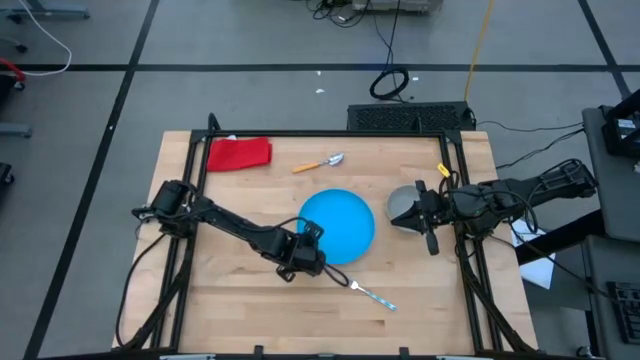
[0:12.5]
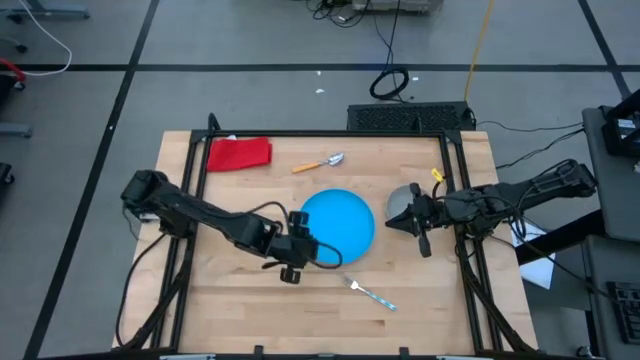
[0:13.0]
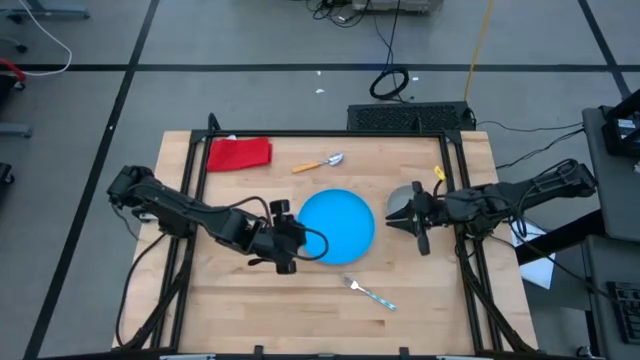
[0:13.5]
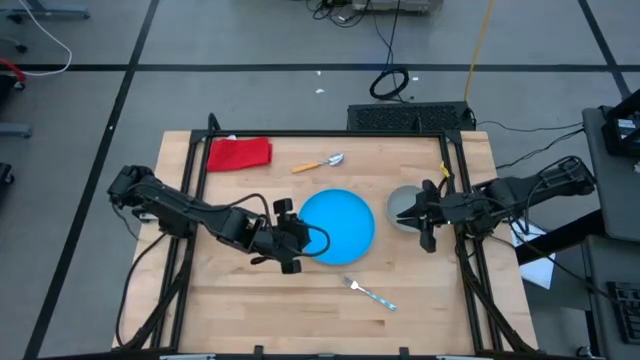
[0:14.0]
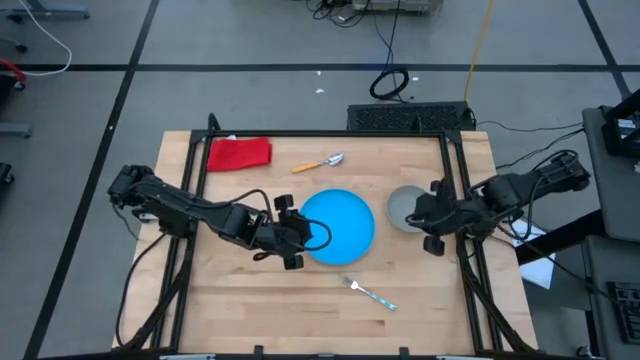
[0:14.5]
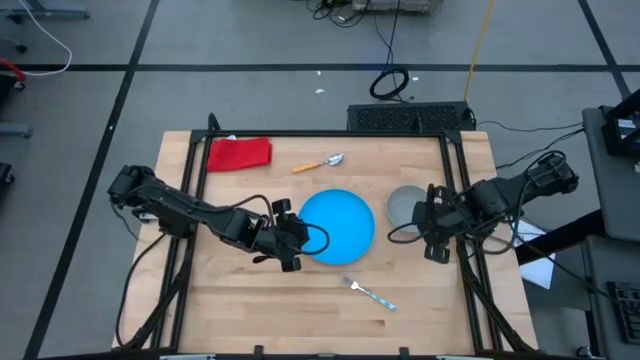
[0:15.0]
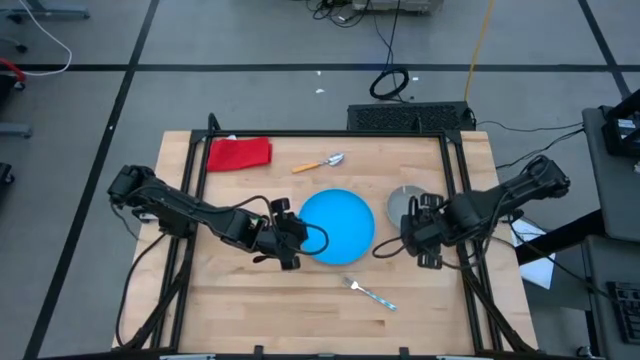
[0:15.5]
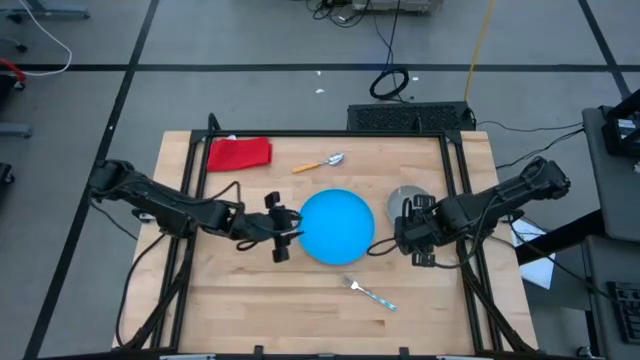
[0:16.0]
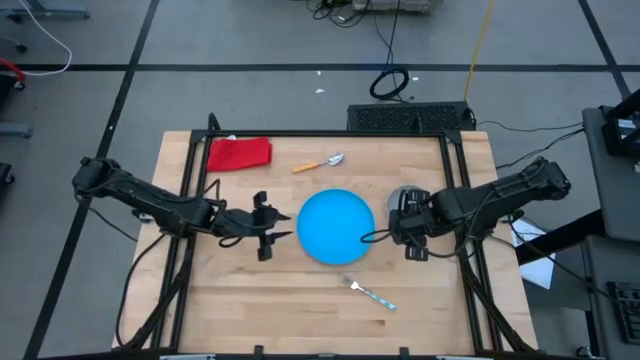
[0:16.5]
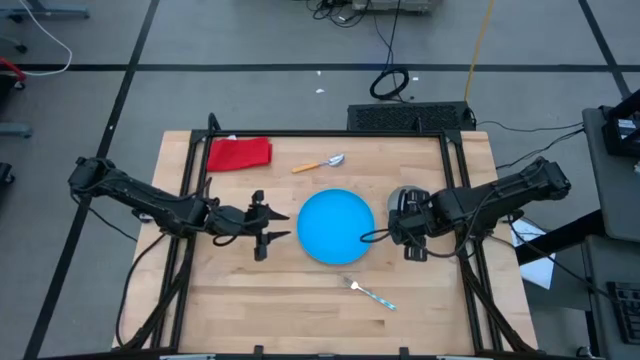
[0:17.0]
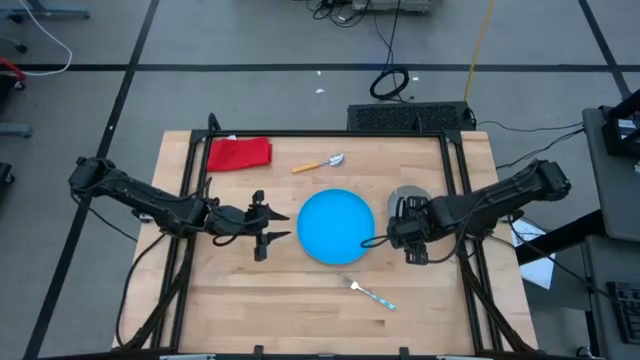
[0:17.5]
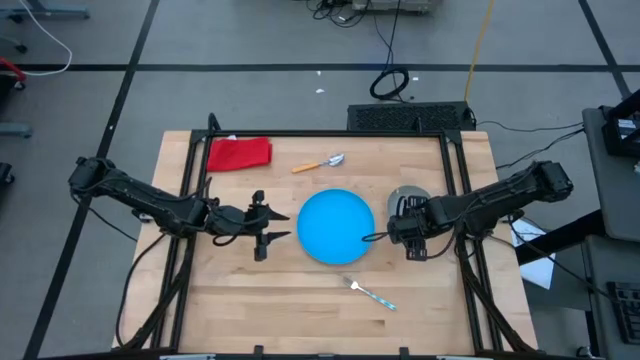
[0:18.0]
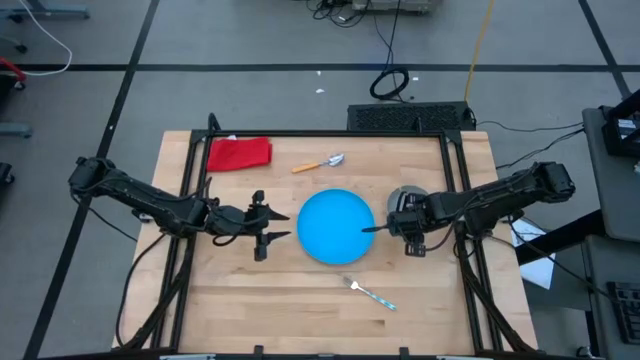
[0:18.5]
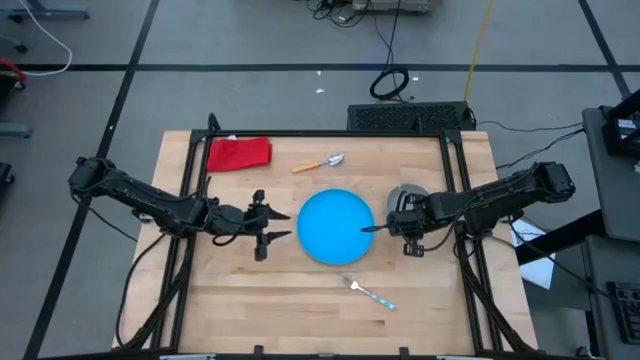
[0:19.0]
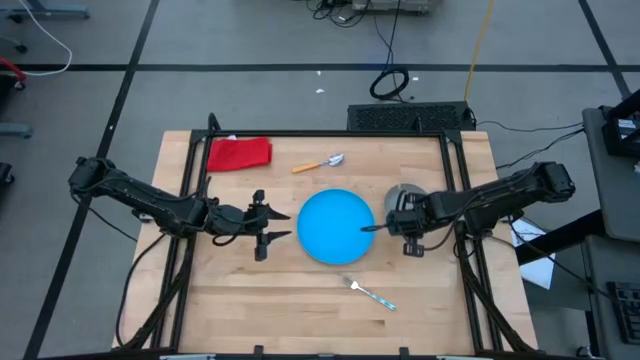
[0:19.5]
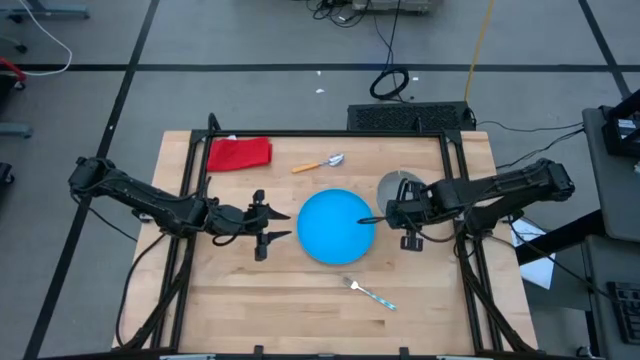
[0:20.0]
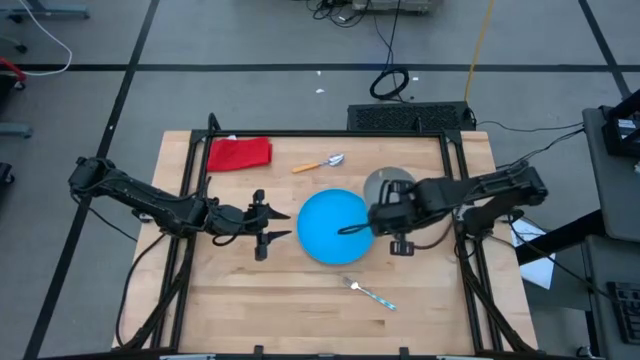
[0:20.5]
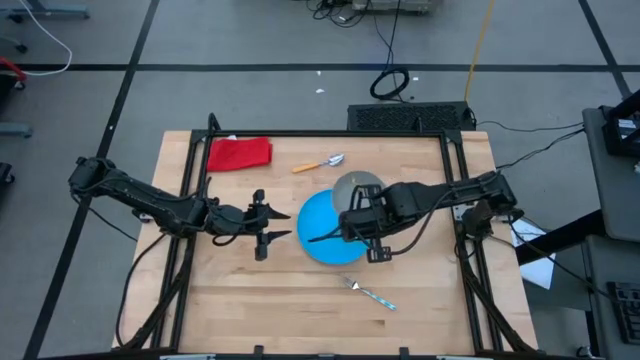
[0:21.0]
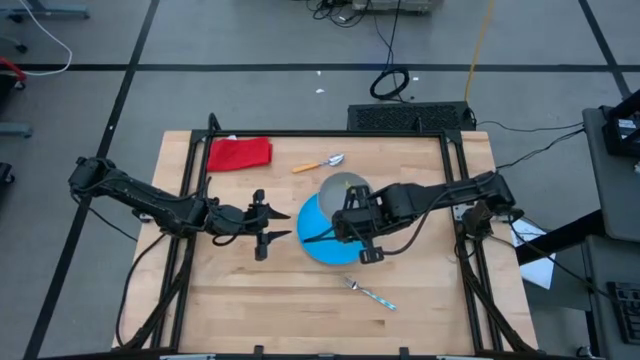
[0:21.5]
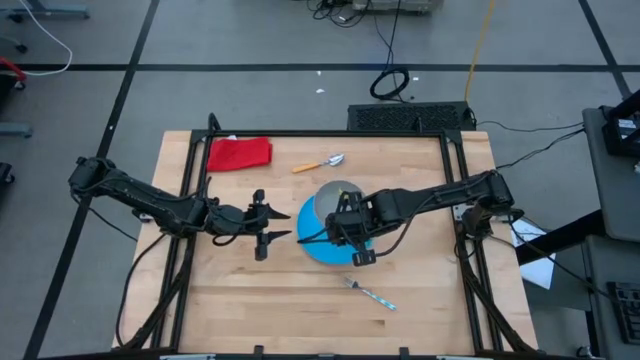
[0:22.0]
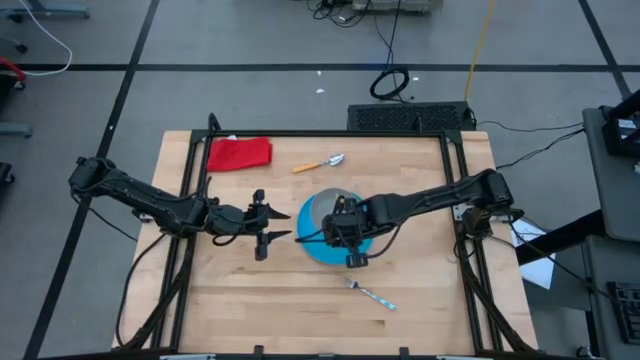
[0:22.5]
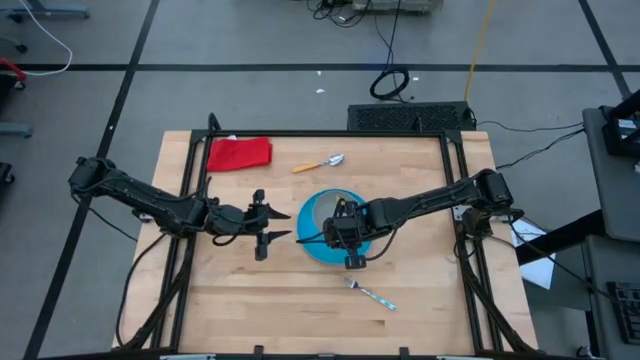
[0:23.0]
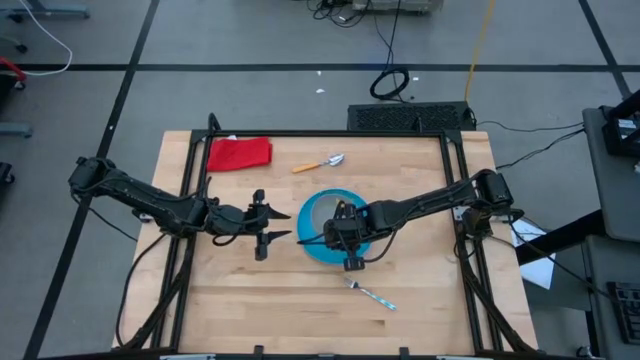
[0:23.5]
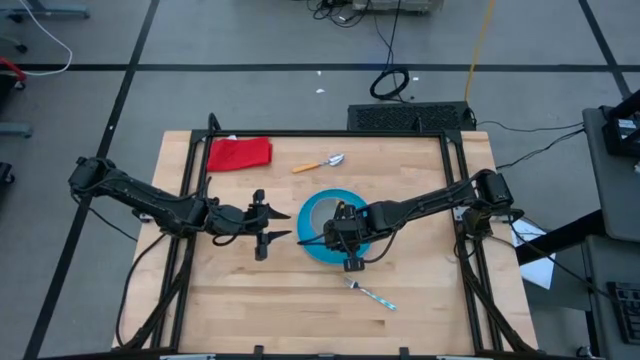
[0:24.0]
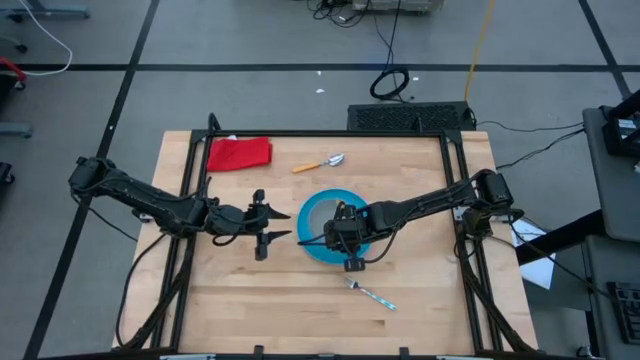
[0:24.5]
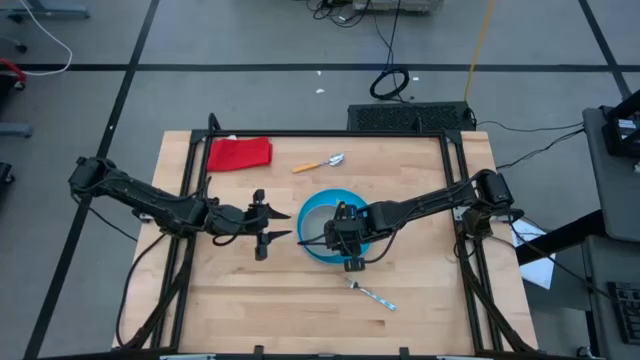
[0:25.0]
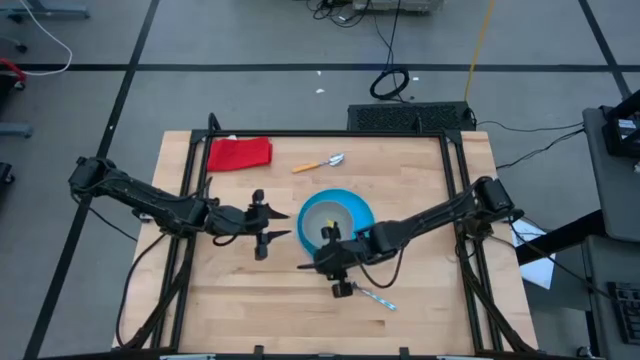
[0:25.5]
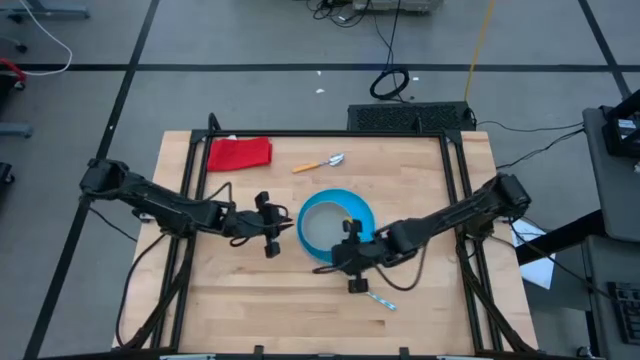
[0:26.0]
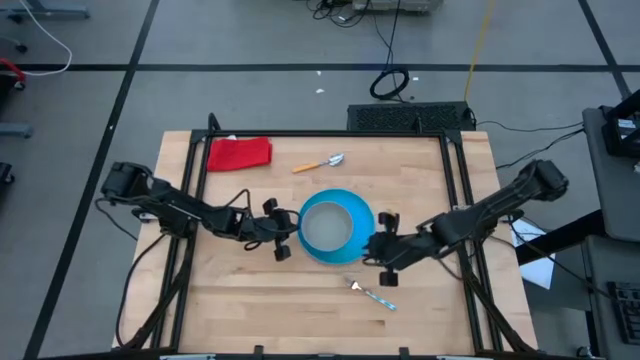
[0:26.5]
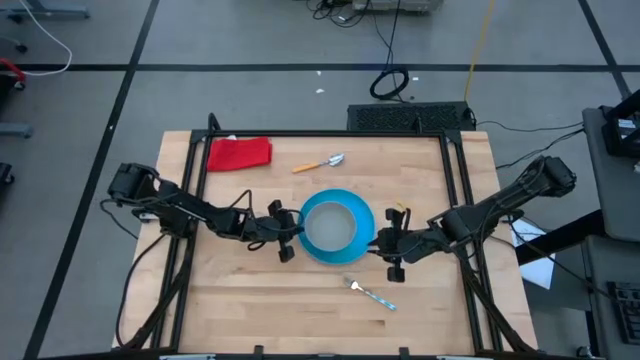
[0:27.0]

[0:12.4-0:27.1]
Task: Set table place
Put the gray bowl on top of the blue plate

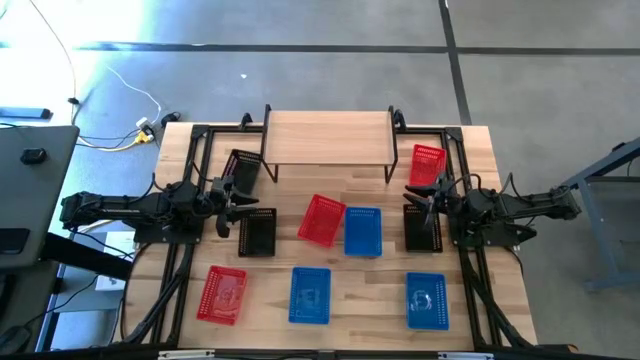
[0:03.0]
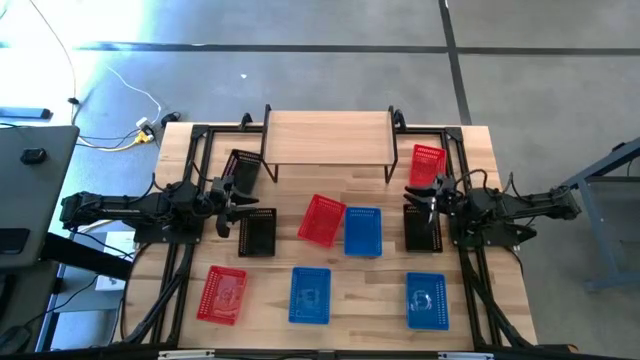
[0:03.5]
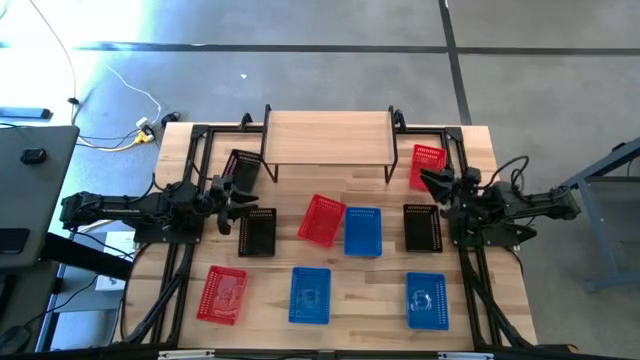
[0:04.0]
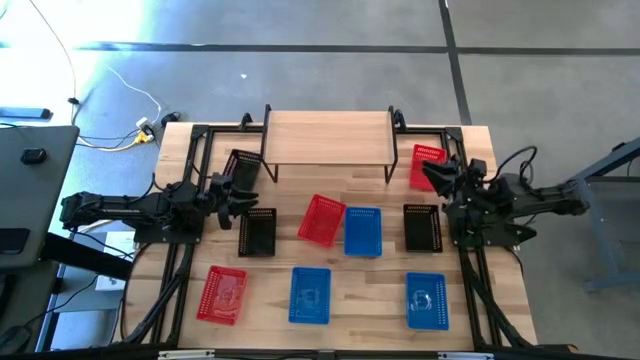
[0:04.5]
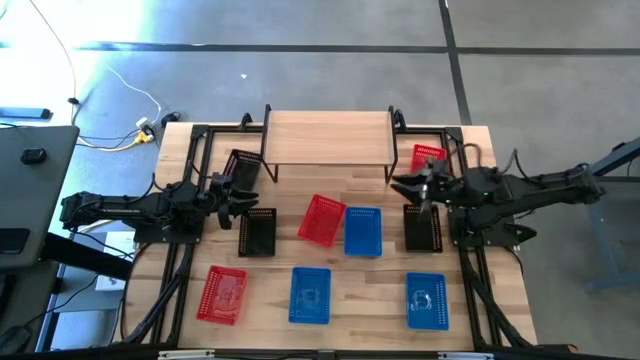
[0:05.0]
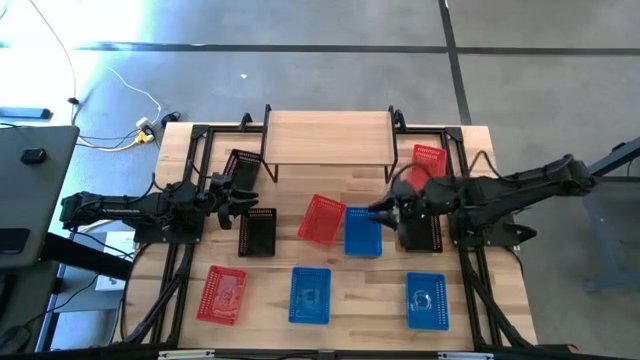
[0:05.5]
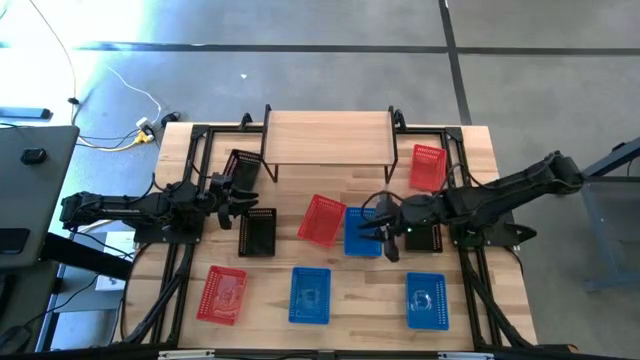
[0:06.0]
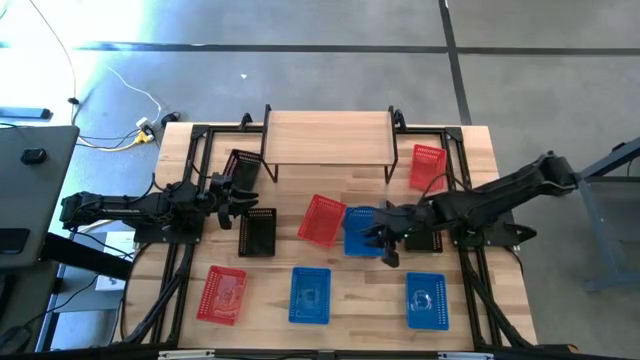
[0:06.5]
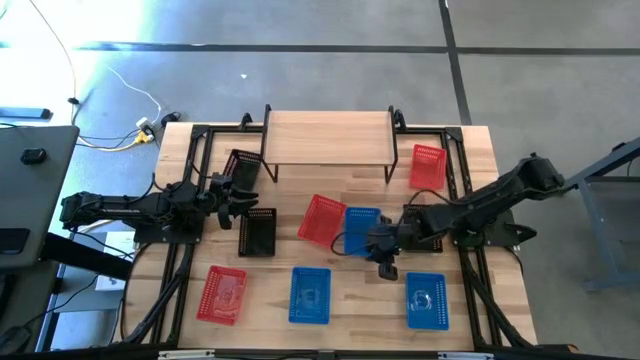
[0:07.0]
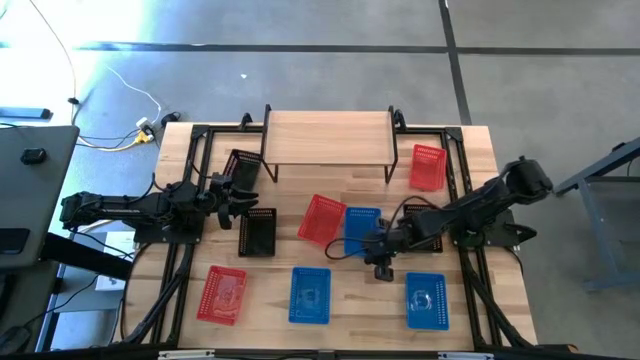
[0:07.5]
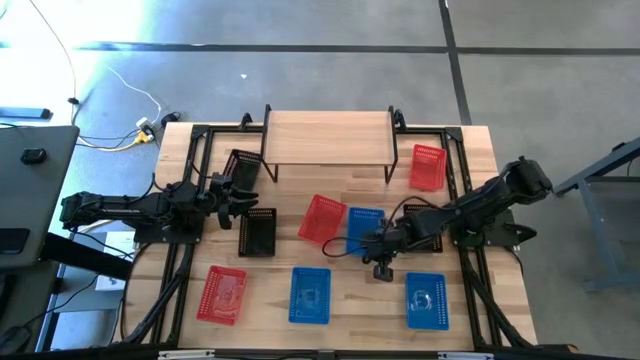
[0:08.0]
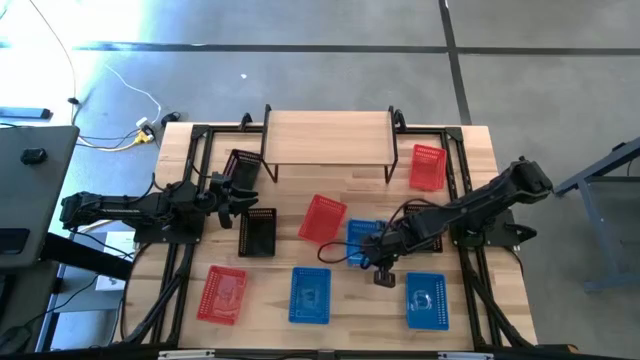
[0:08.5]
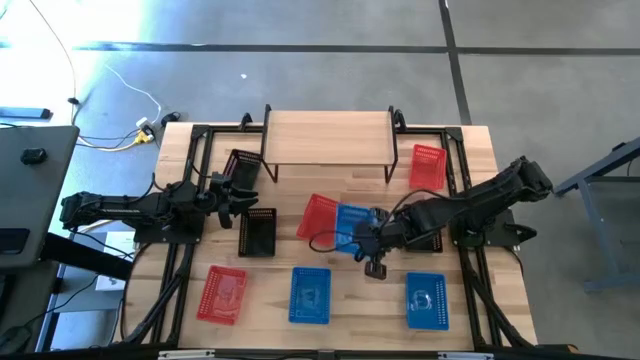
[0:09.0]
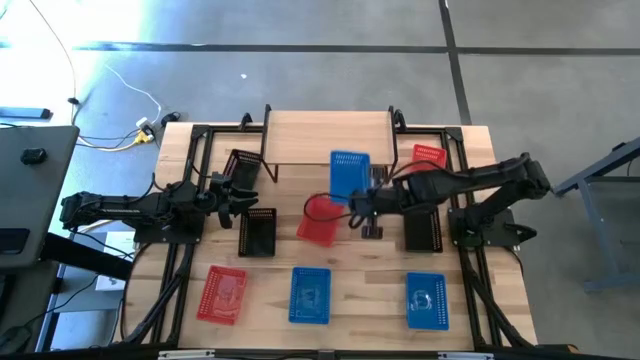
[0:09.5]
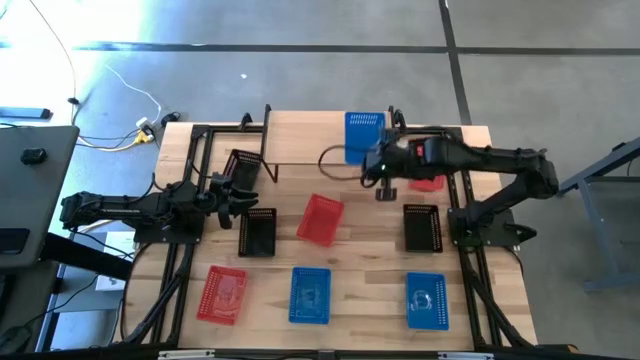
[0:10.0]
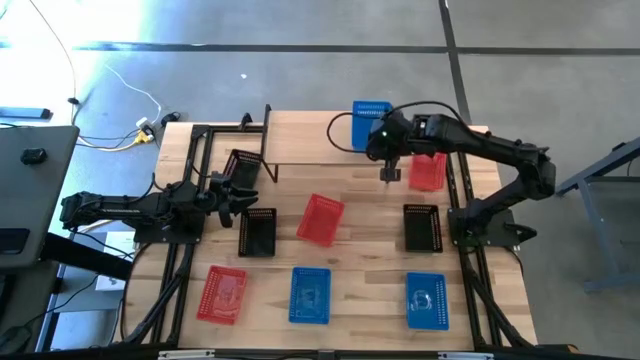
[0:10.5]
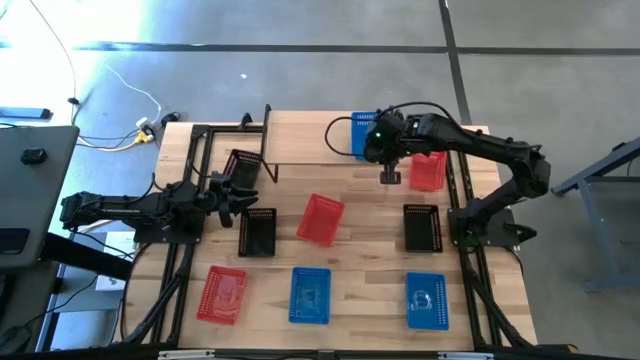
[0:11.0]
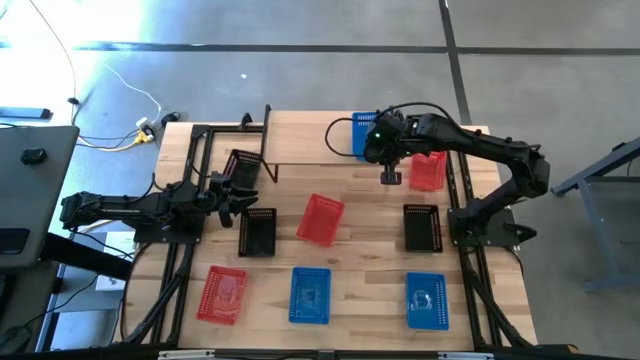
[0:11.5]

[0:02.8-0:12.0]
Task: Stack baskets on shelf by color
Put the top blue bin on the shelf
